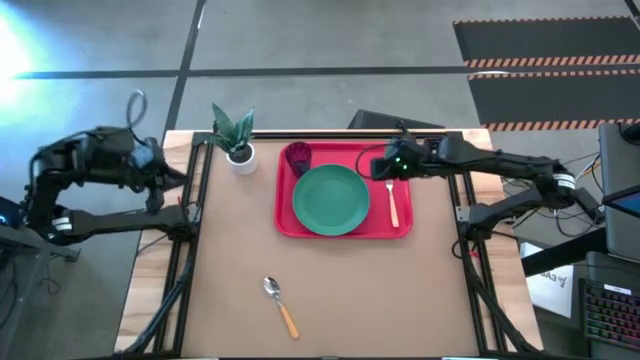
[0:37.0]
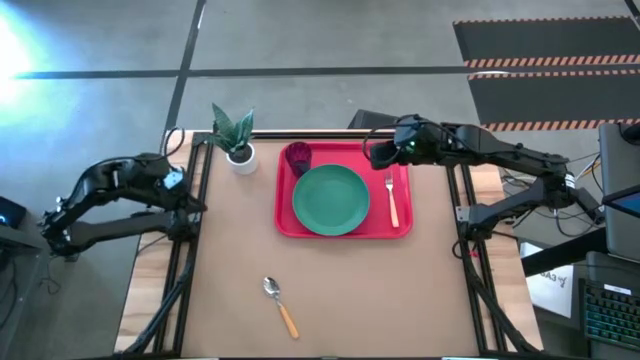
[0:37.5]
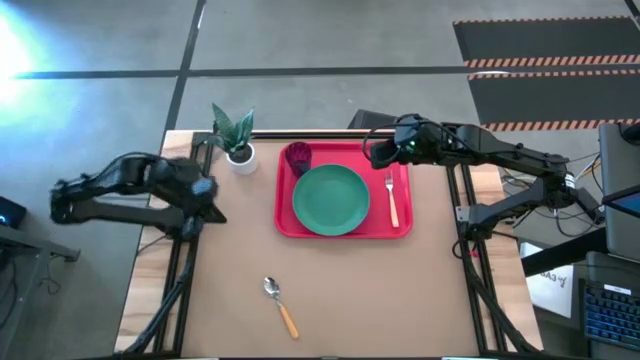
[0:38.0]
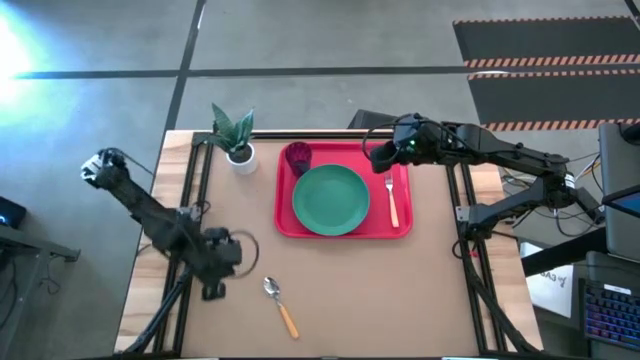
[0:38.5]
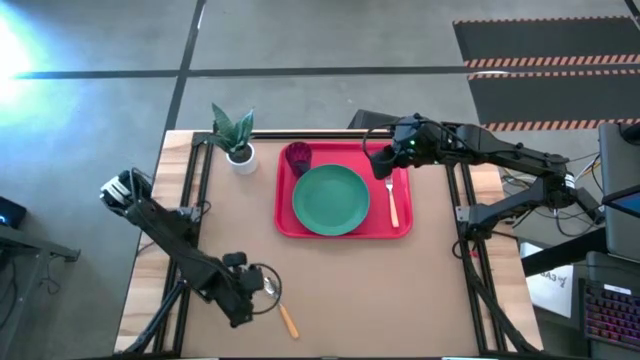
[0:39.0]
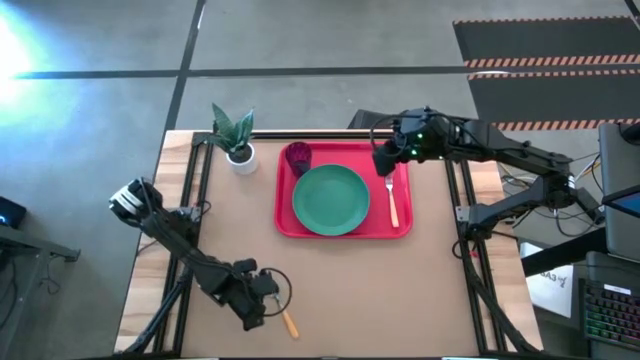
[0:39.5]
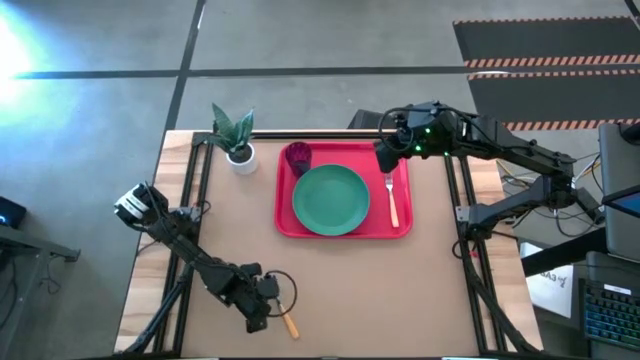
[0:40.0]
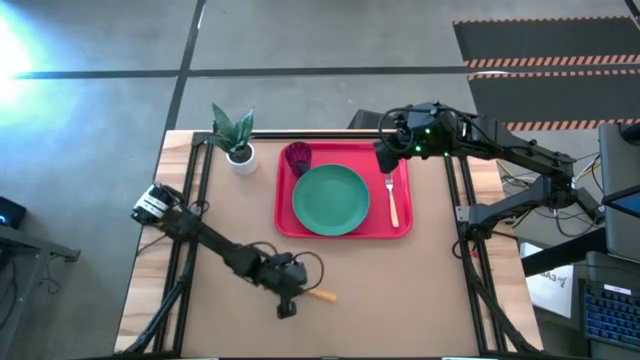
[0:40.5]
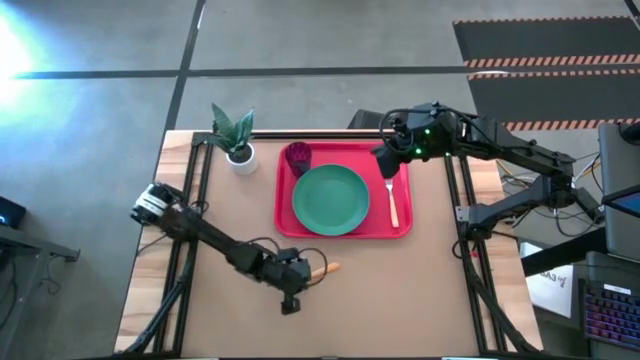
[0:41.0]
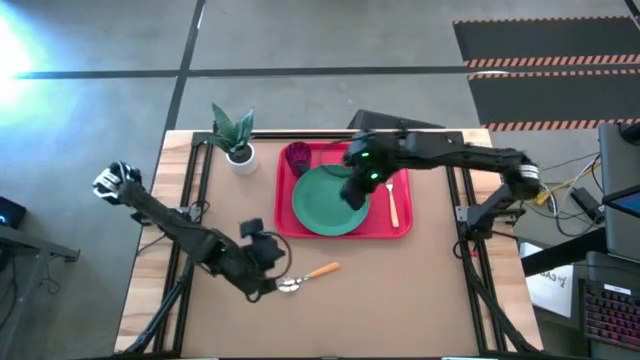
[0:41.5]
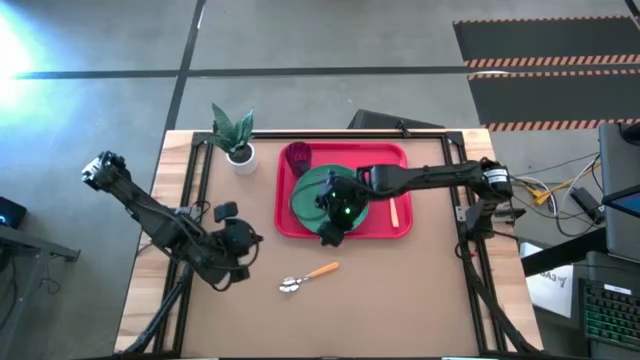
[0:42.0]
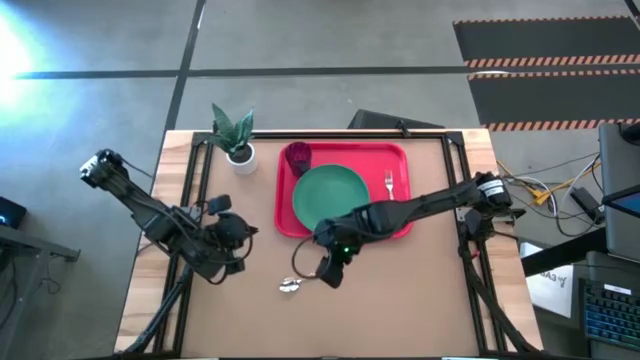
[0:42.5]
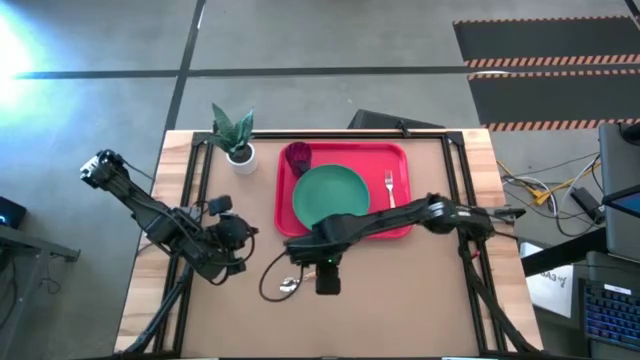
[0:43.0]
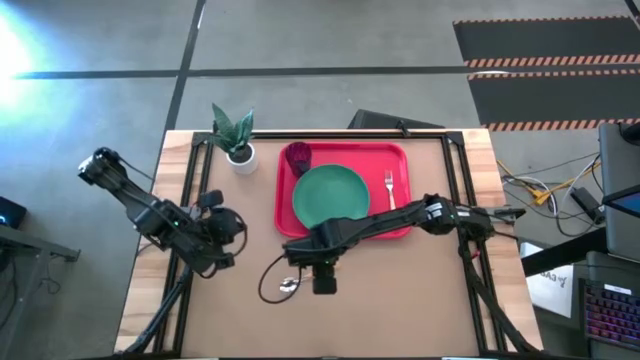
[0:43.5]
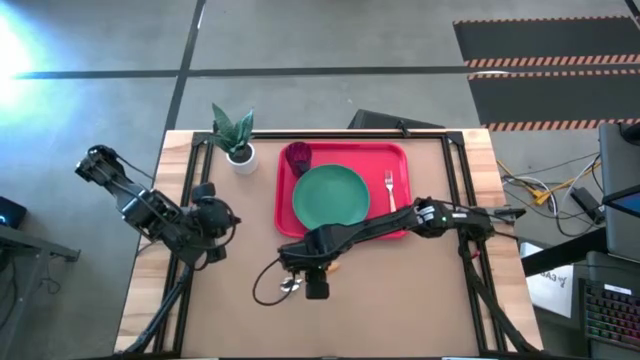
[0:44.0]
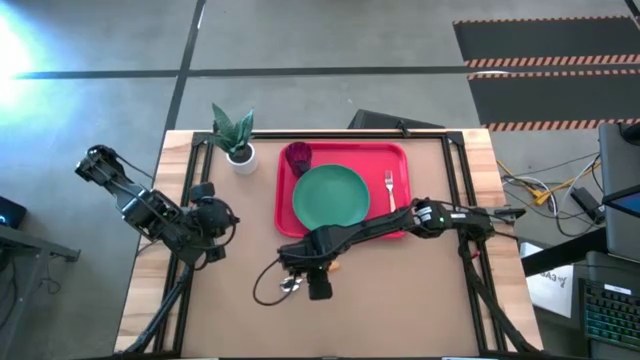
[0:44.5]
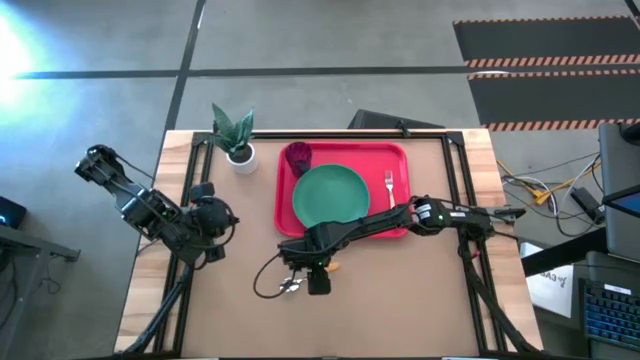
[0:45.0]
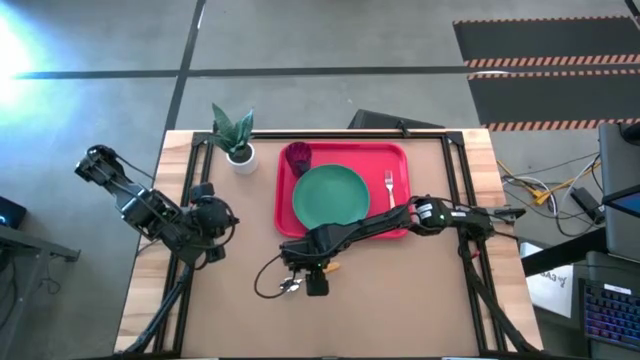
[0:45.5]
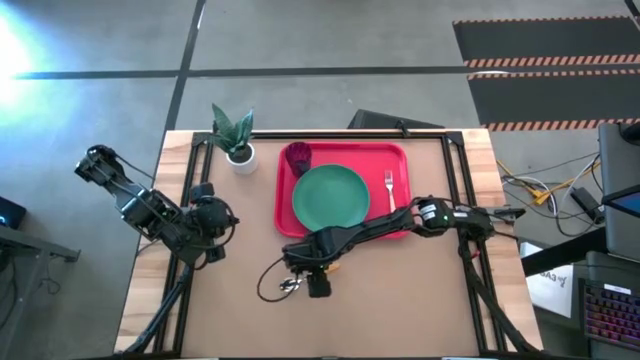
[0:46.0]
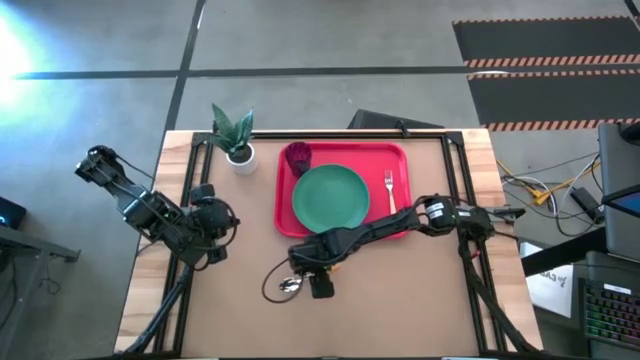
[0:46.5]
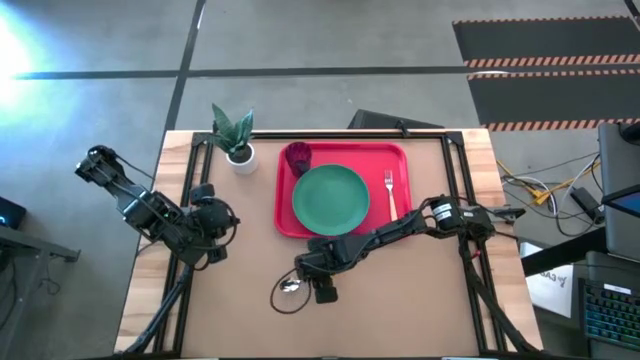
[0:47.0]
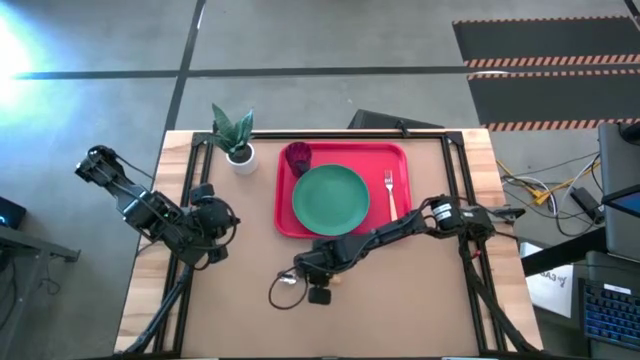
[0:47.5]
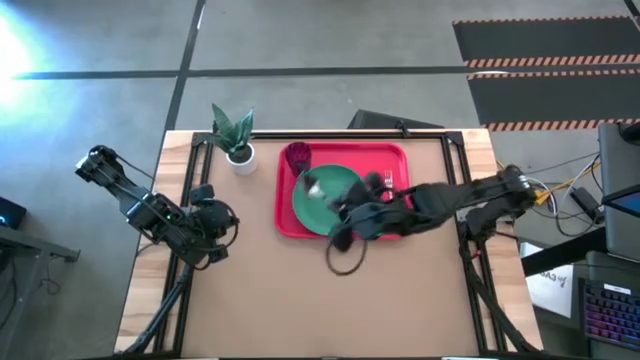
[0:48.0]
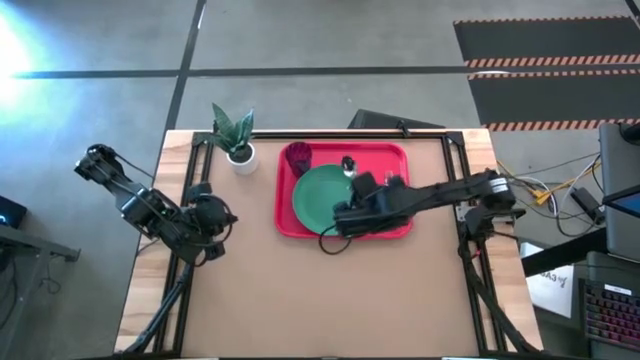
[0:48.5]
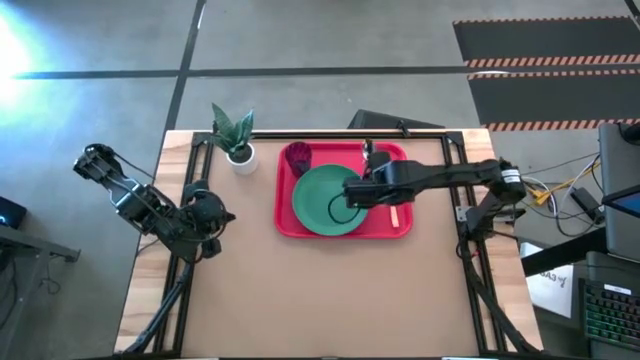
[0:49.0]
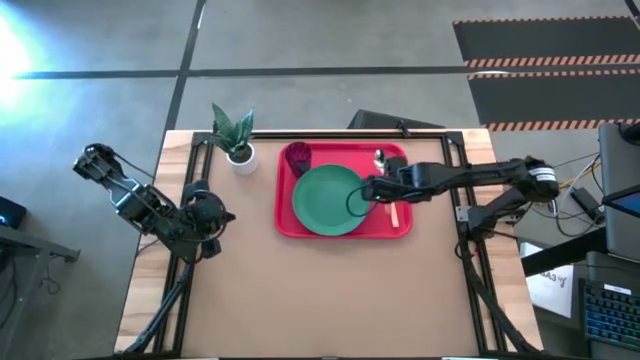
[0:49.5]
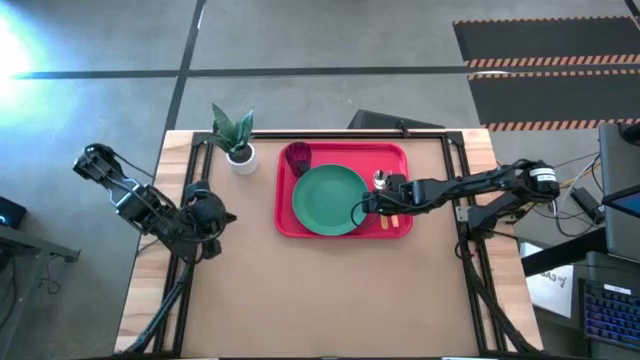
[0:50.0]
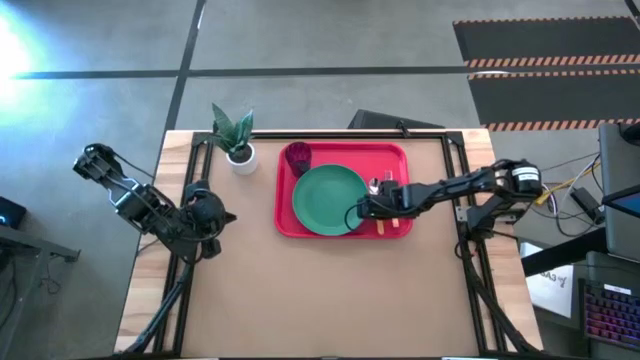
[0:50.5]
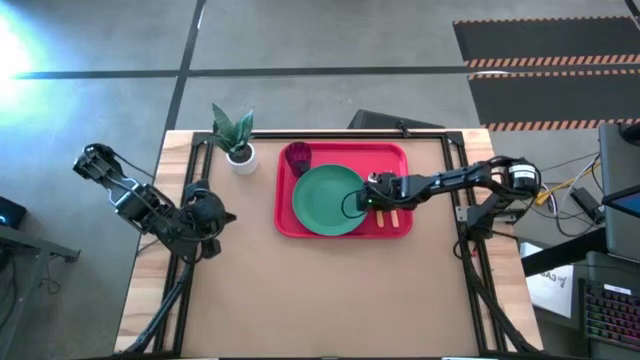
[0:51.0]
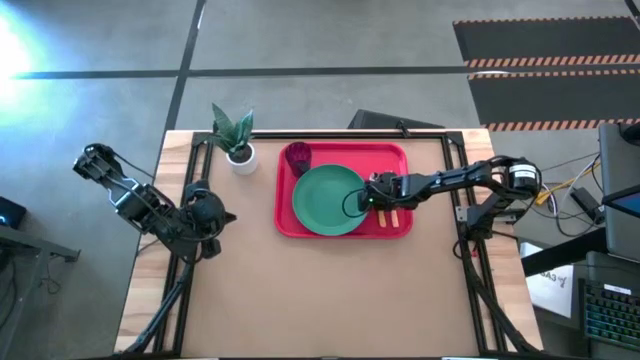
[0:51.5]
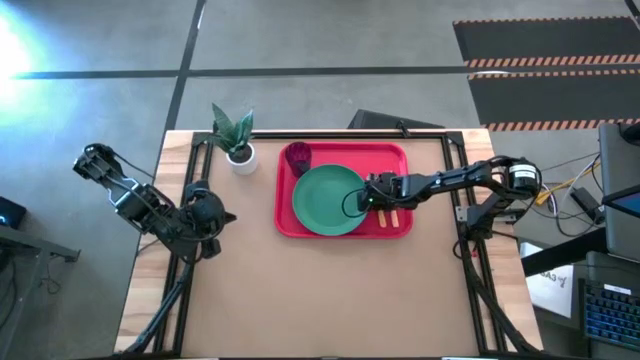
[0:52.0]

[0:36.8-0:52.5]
Task: Pick and place plate/cup/fork/spoon on tray
Put the light orange spoon on the red tray between the light orange fork and the green plate

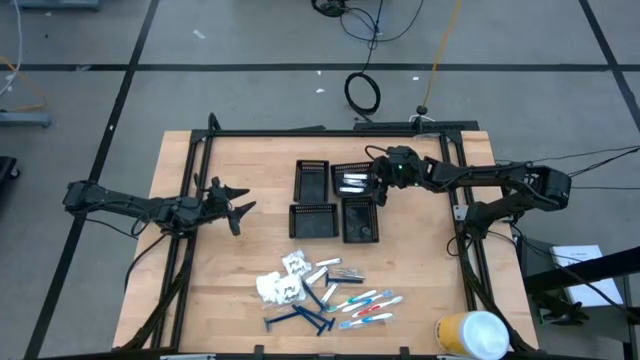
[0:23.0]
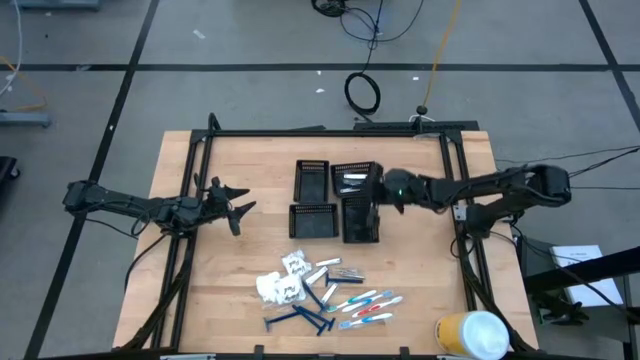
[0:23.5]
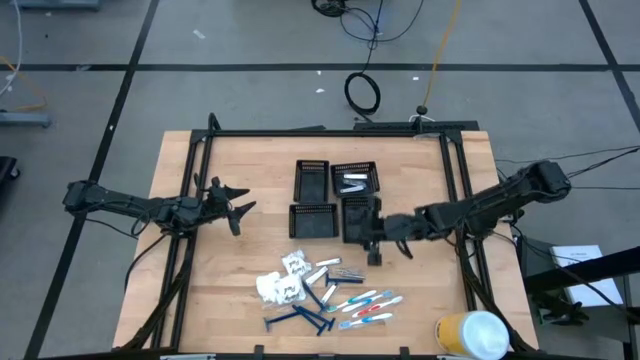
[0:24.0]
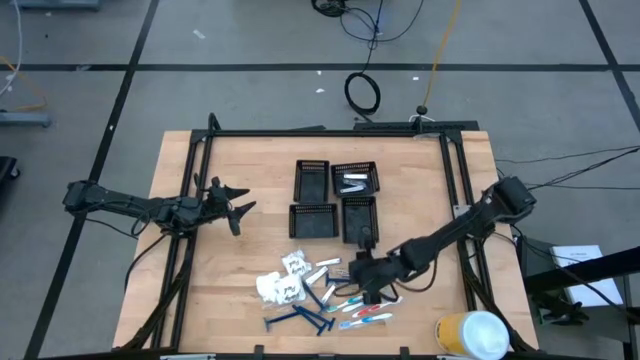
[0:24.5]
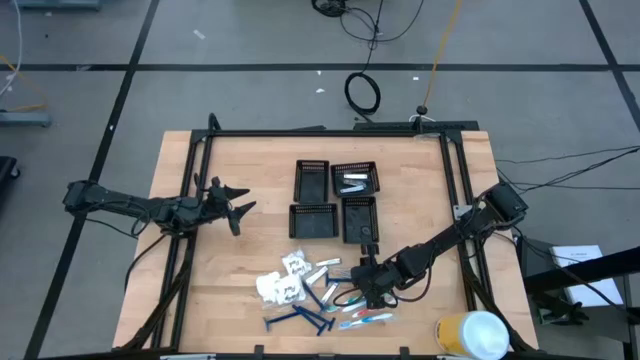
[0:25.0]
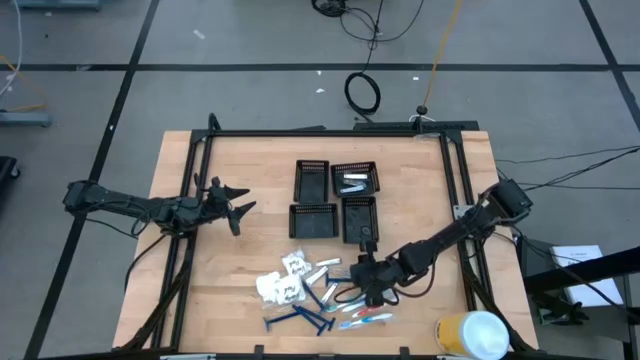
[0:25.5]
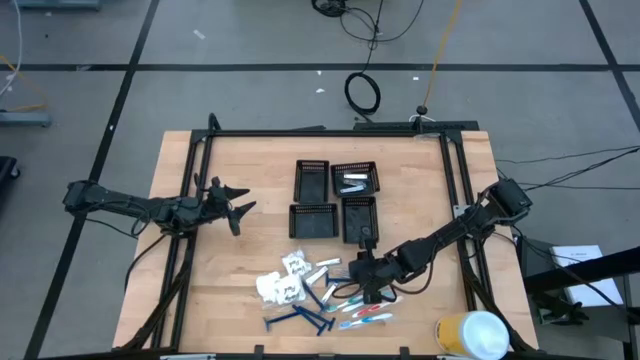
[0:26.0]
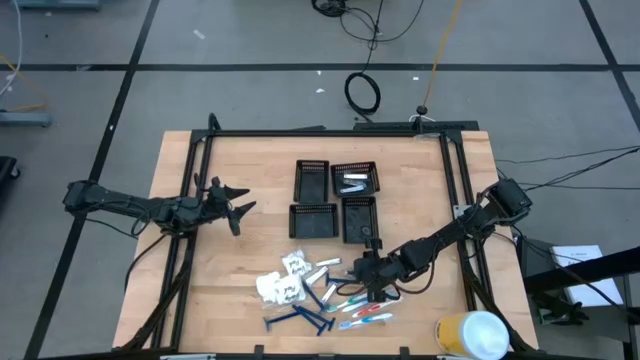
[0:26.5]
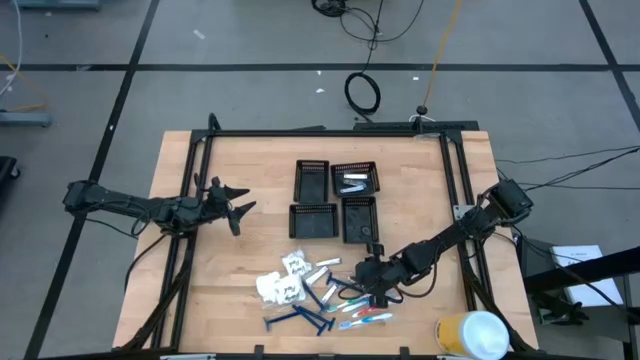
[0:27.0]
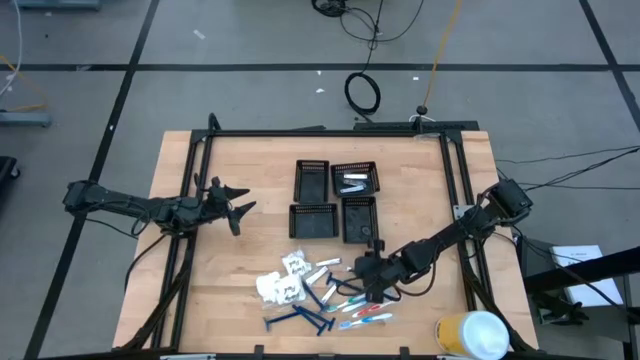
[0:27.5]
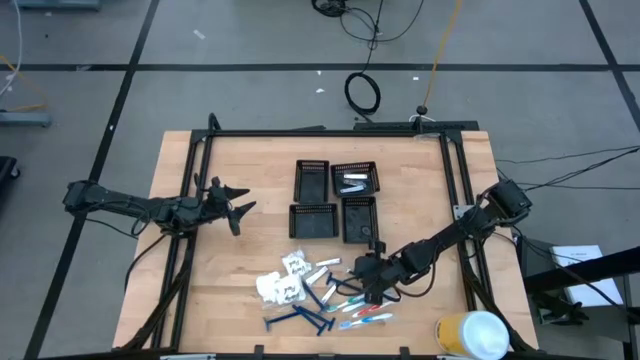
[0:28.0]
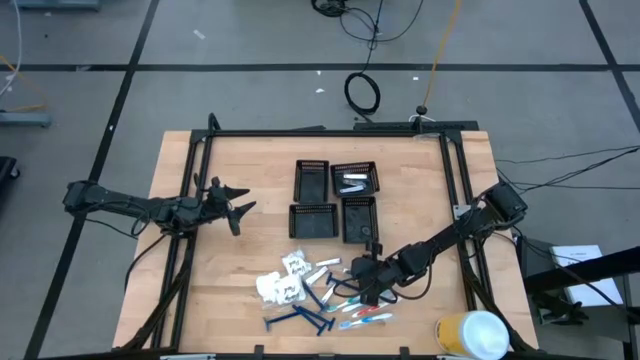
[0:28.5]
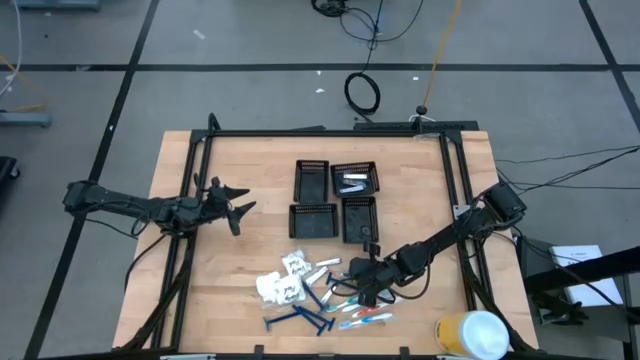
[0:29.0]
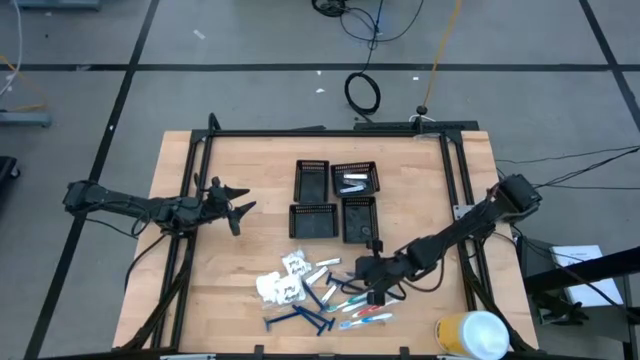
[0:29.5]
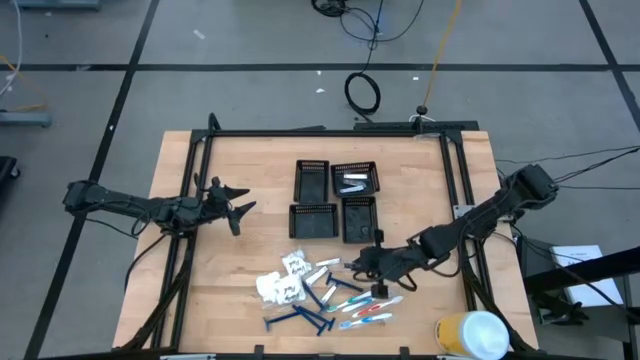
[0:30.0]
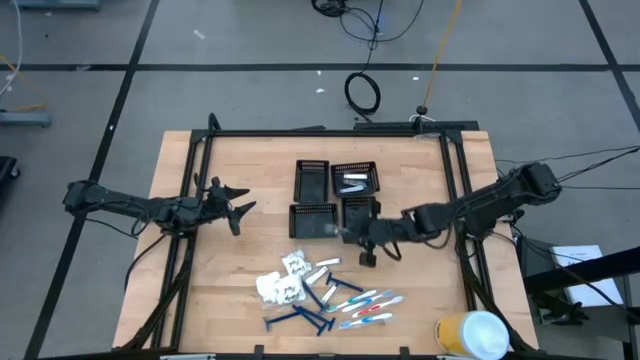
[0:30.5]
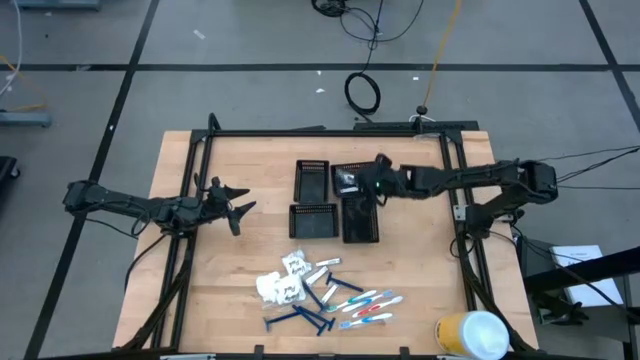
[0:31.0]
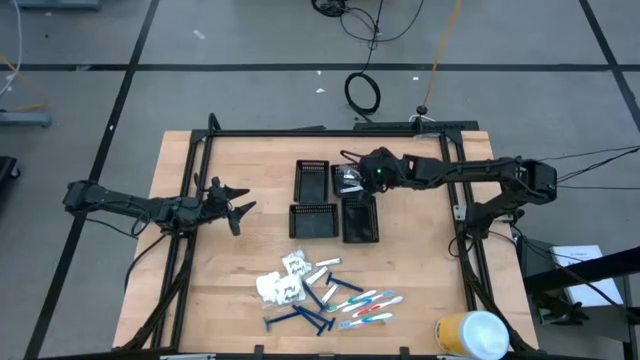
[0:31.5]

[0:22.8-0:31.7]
Task: Pick & Place Travel size toiletries
Put the silver nail cutter into the top right black bin
